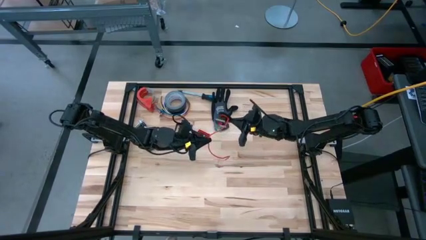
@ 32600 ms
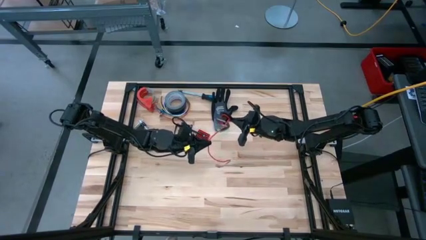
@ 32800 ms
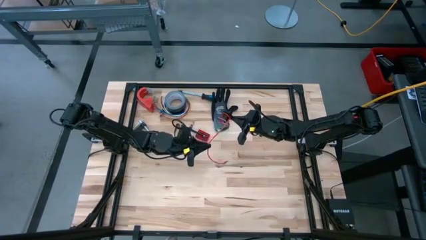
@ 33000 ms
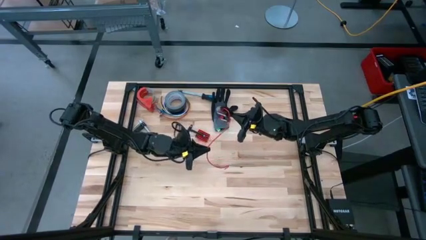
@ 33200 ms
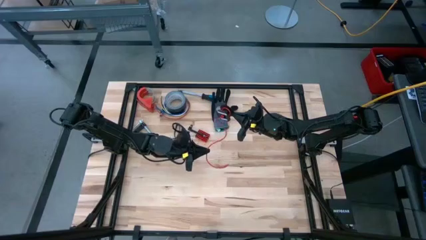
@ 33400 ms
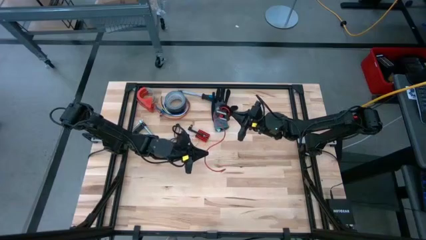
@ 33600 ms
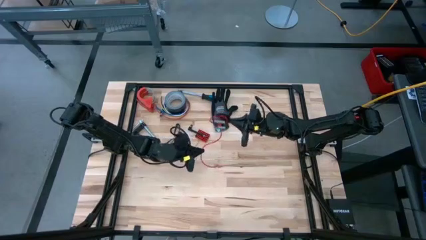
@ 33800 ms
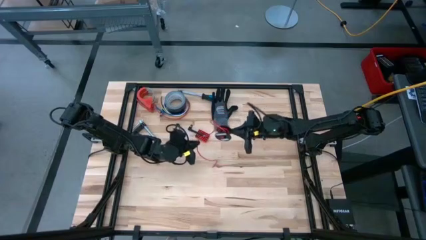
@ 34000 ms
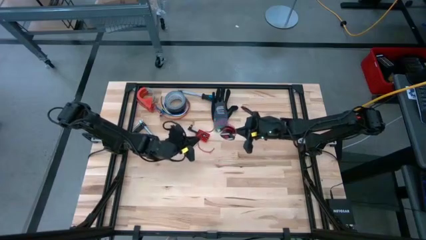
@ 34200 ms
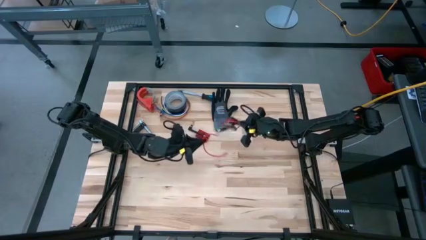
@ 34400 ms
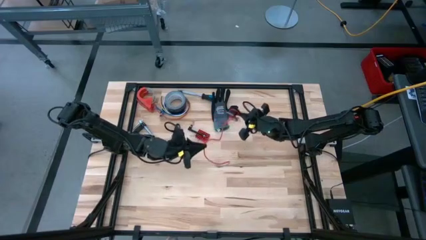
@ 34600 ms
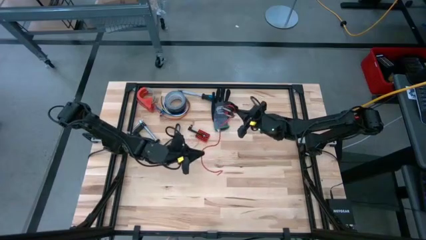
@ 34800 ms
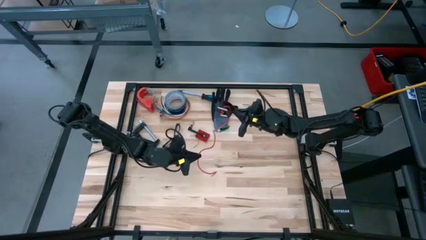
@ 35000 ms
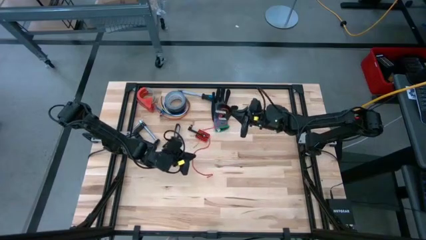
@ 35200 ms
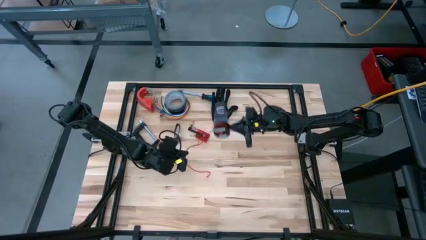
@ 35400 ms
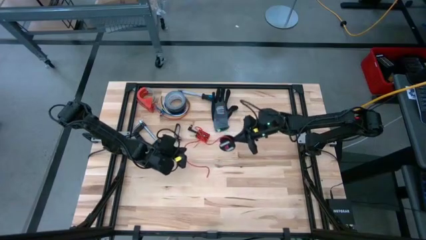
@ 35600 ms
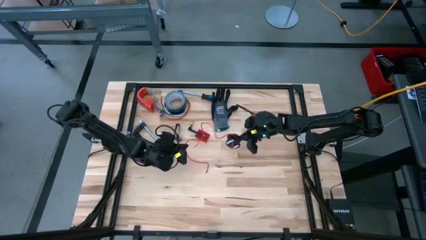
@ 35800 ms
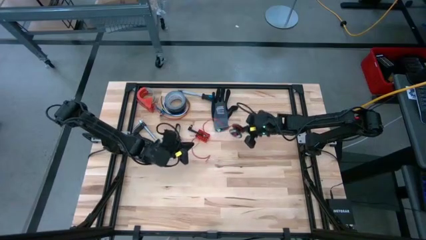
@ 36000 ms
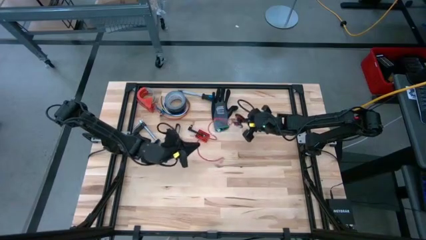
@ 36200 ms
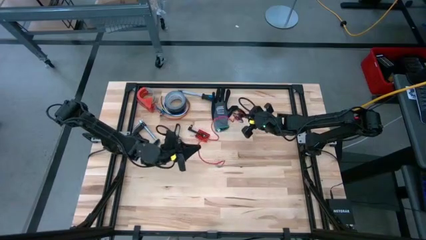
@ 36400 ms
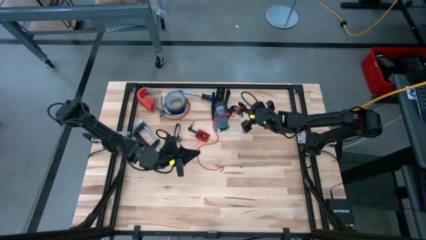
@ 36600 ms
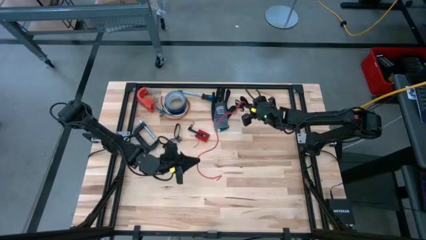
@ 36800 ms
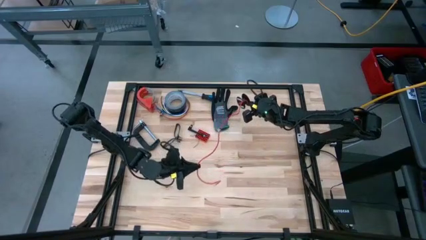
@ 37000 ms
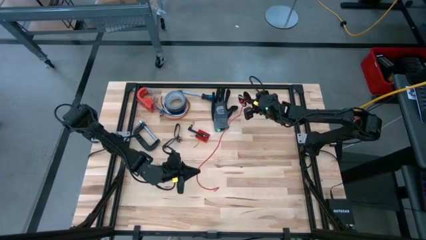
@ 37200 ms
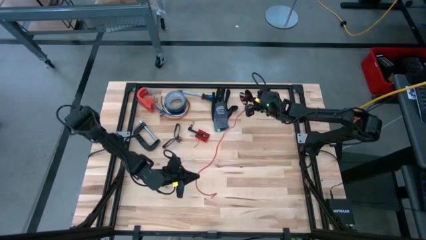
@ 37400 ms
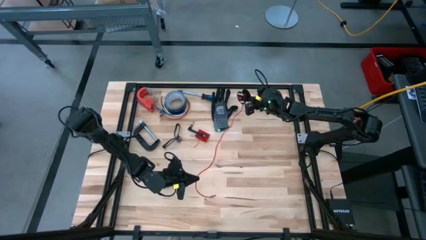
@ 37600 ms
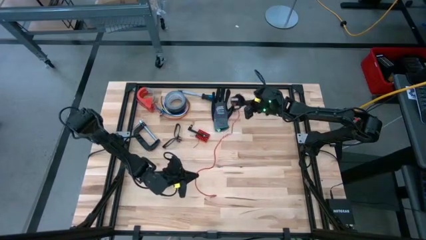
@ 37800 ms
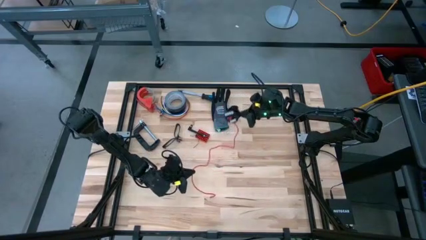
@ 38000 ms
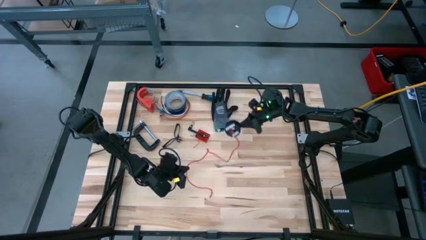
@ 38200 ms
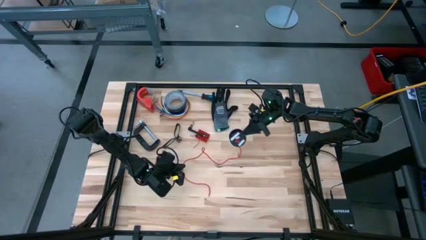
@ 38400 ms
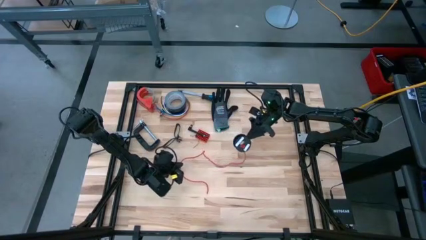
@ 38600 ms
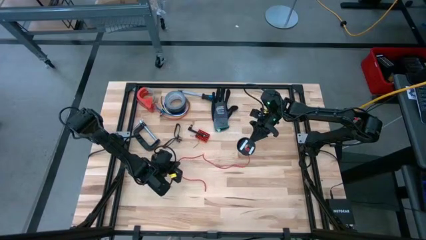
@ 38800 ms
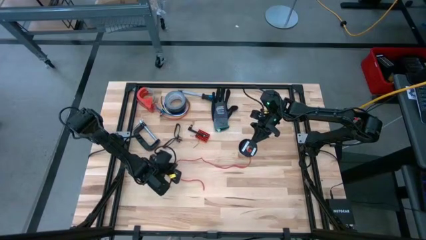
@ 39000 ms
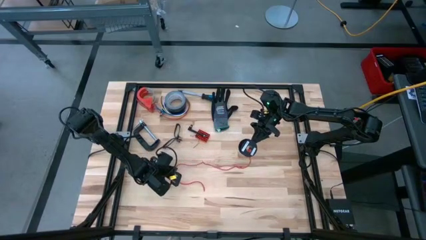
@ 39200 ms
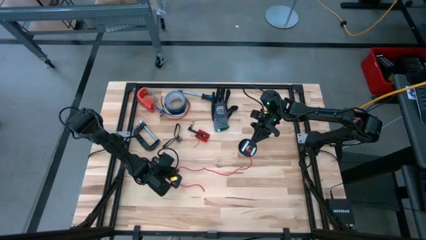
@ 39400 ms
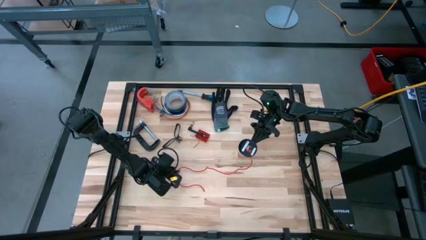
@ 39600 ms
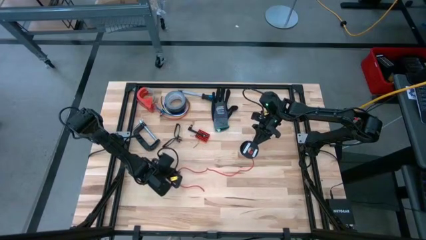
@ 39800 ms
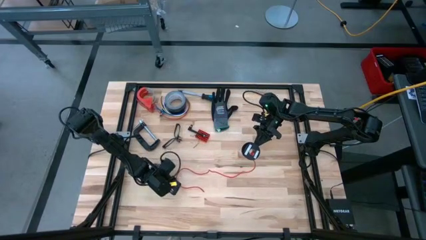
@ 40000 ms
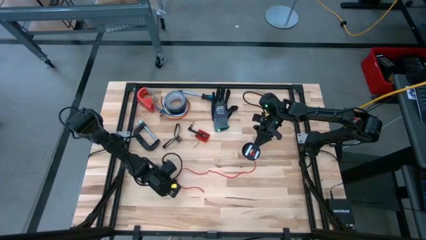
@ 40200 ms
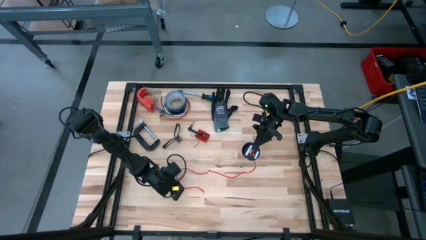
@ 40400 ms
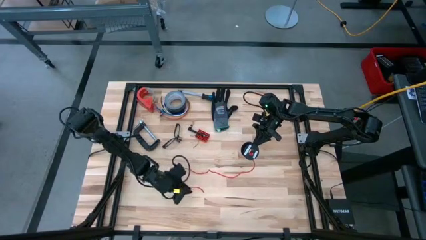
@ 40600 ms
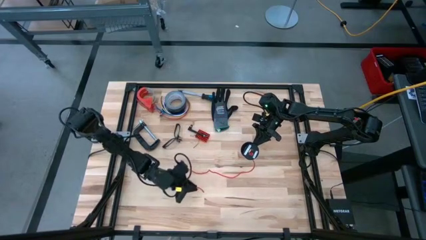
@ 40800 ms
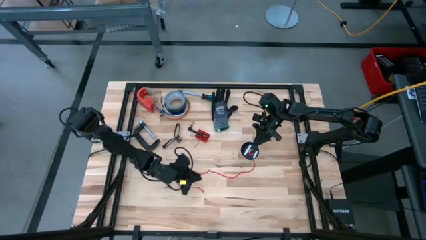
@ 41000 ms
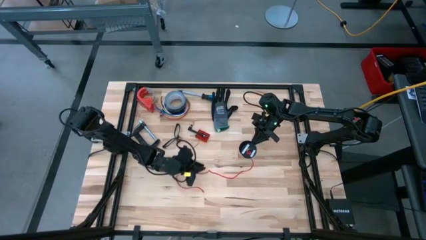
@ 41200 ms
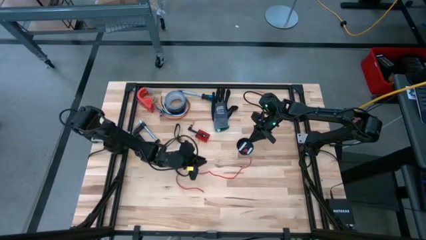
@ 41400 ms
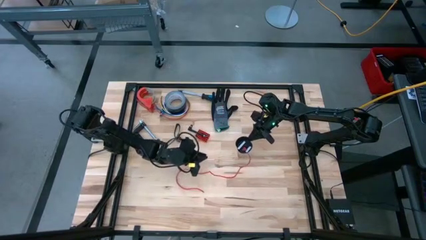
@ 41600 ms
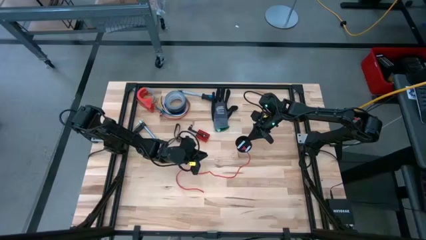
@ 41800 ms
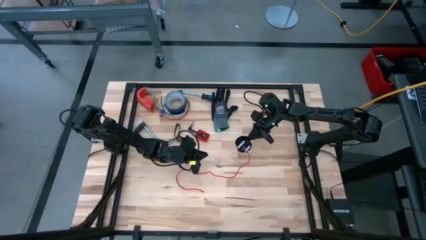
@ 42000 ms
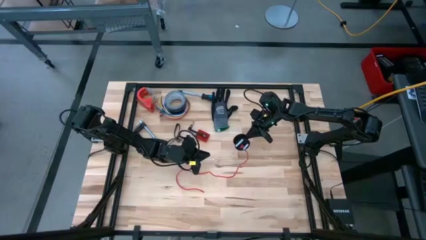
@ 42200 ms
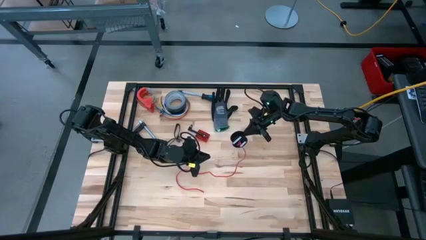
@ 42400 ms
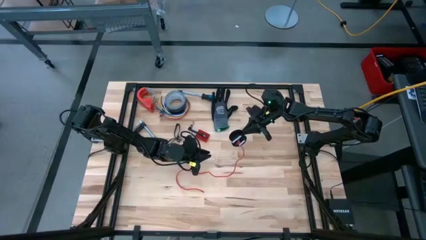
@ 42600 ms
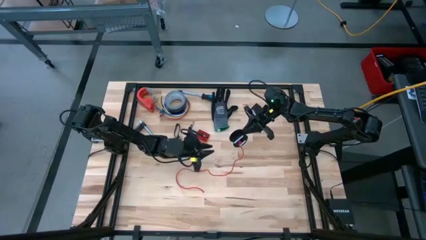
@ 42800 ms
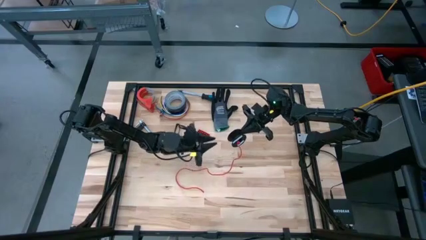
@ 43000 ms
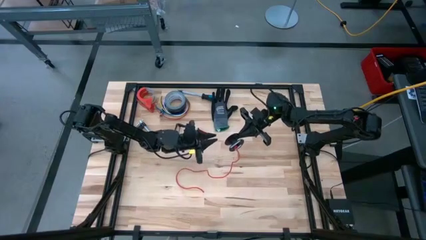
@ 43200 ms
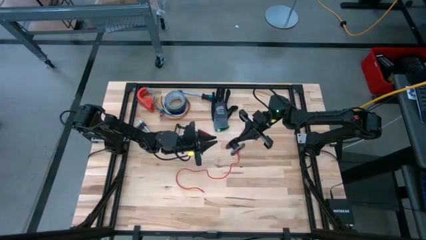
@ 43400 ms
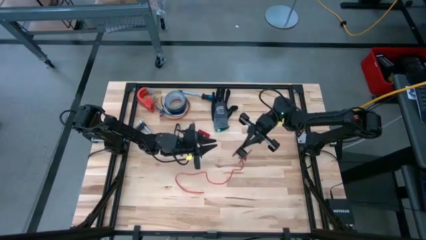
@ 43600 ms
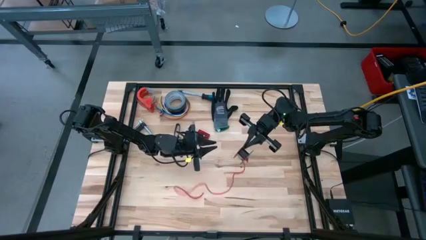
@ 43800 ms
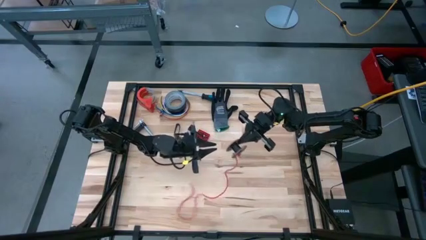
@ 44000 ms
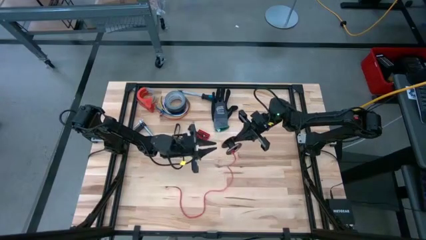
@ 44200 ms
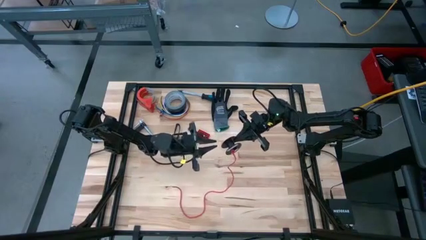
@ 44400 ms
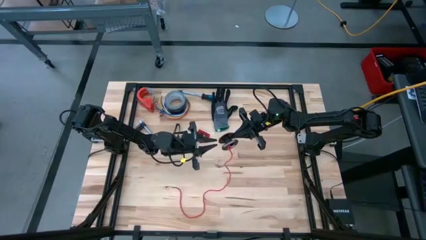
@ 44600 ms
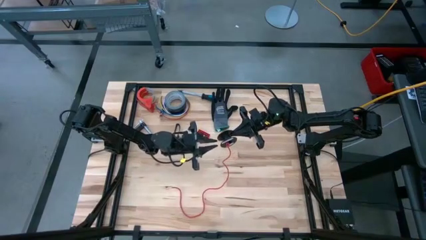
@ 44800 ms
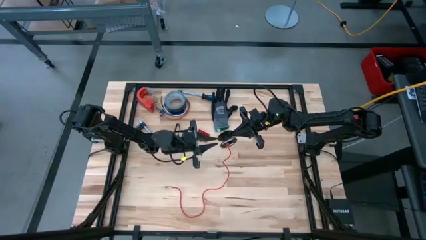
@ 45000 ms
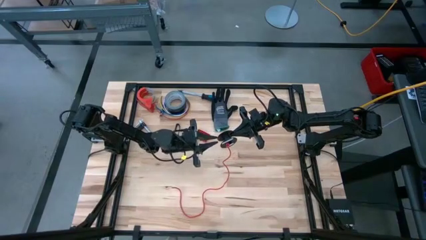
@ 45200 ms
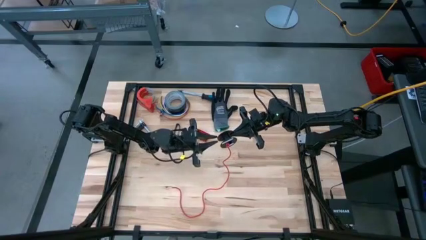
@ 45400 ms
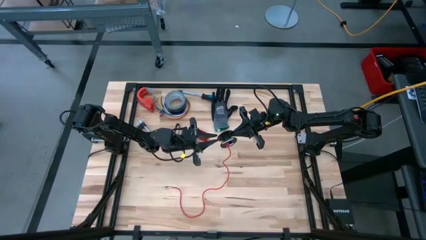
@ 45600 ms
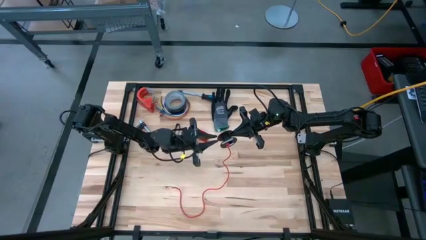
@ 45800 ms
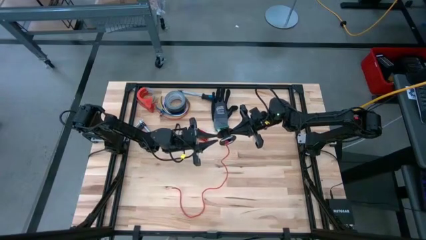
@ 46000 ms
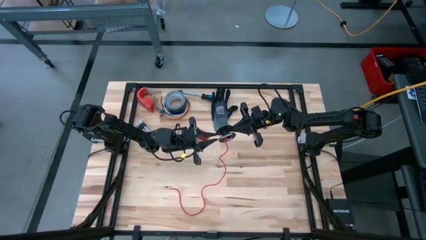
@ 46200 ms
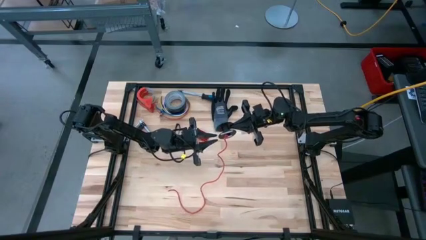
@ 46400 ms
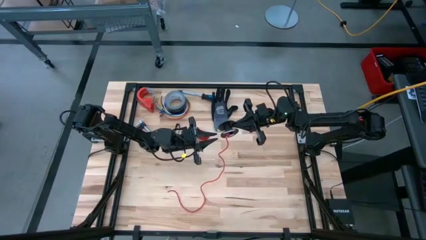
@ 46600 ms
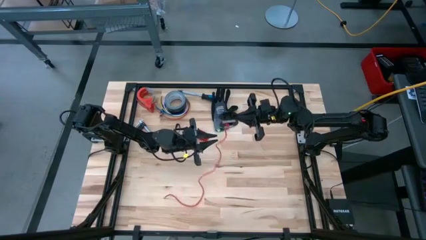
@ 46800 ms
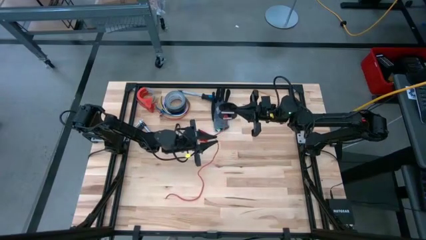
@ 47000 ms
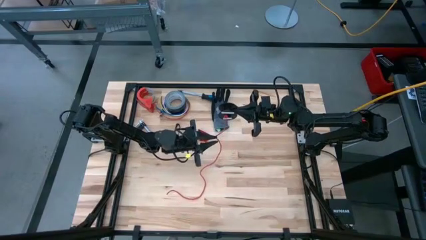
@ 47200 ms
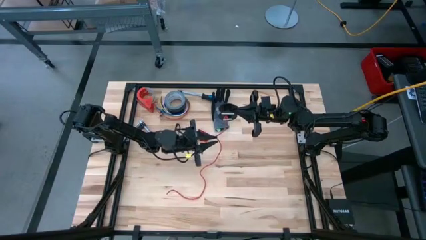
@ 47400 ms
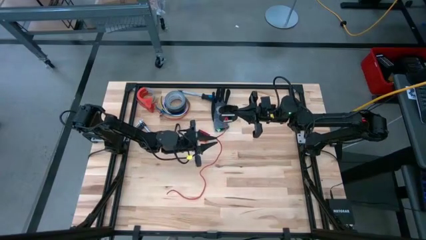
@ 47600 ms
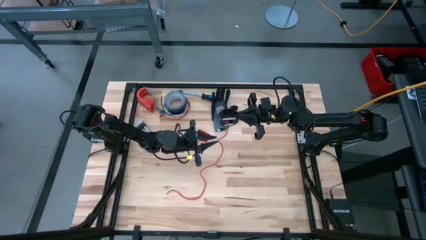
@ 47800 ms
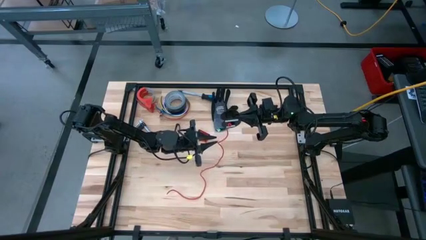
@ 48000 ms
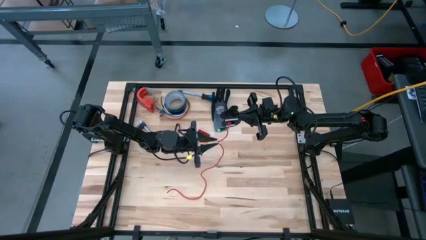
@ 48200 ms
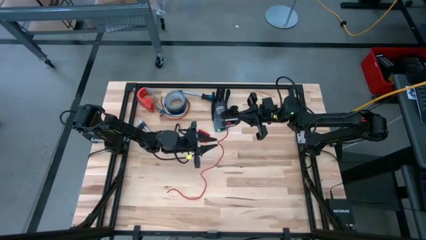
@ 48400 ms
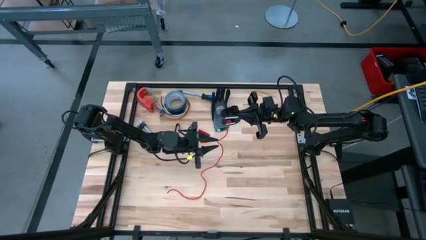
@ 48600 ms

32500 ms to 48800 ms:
Task: Coil cords
Uncoil the orange wire from the black spool
